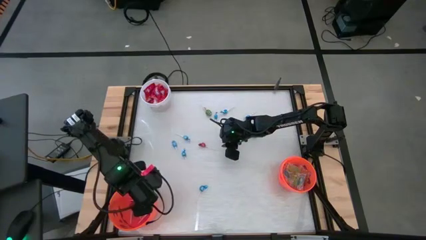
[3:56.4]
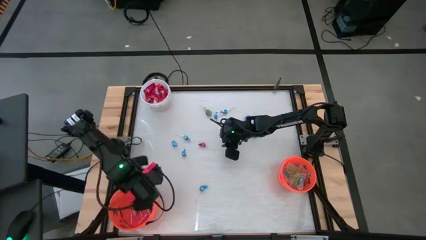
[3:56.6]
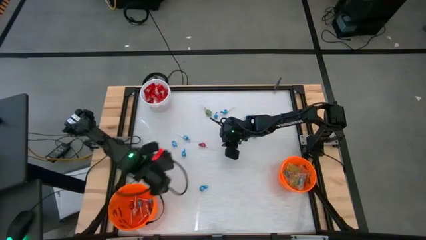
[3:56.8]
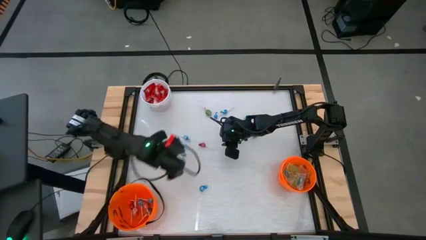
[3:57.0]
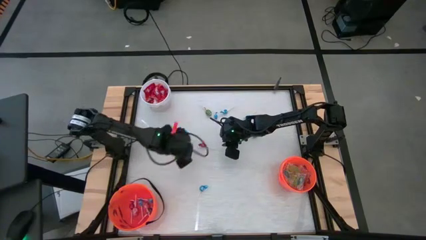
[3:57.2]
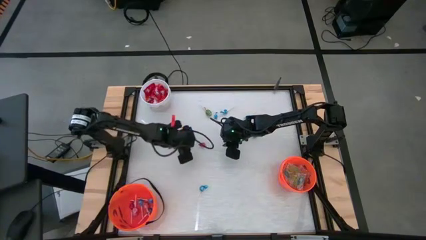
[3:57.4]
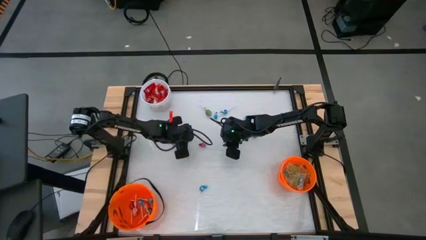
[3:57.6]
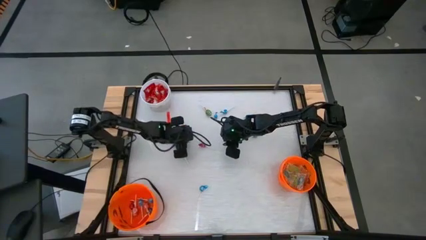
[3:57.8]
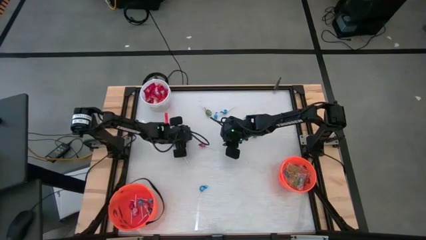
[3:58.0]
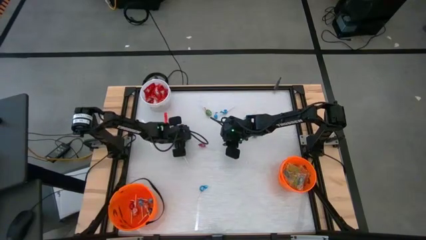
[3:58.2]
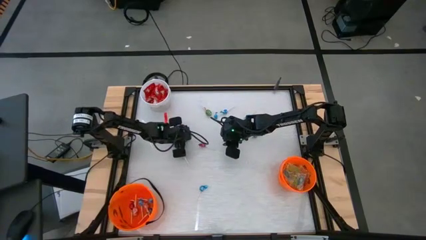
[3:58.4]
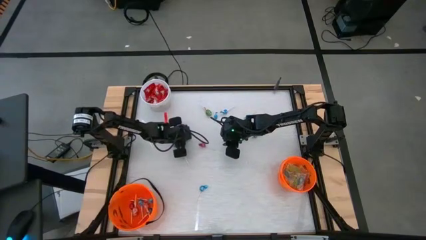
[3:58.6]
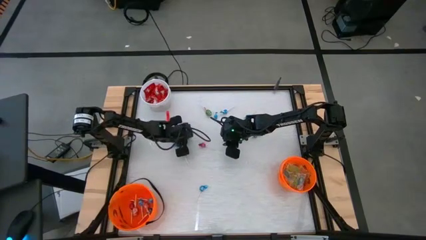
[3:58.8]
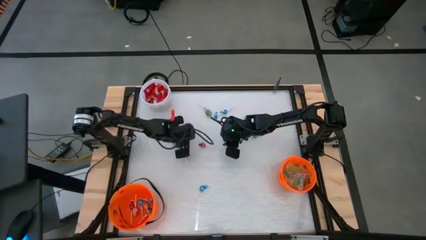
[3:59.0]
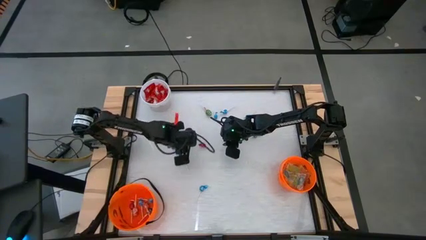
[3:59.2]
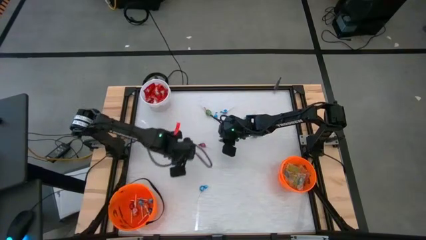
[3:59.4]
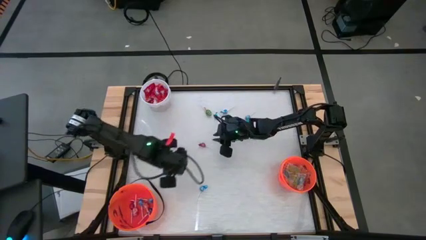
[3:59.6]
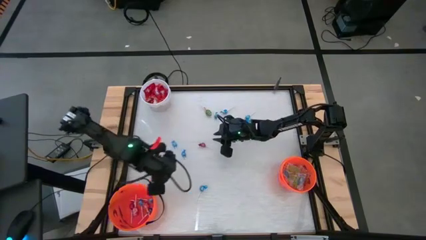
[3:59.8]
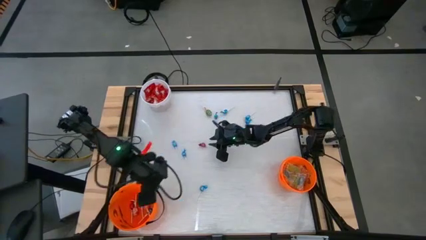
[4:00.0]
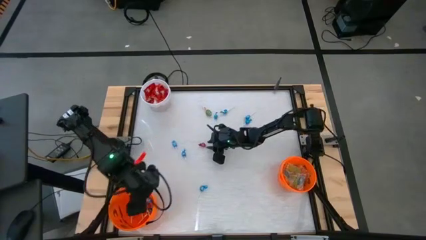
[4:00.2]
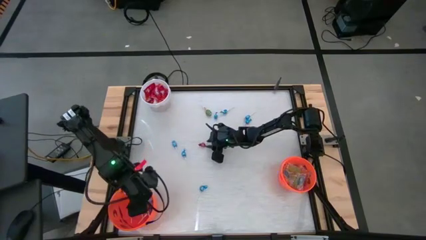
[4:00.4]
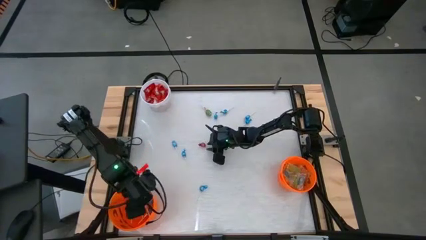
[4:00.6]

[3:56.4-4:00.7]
Task: Sort candy by brand, put in halloween buckets
Put the blue sucker into the left orange bucket

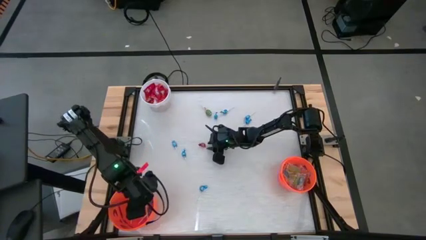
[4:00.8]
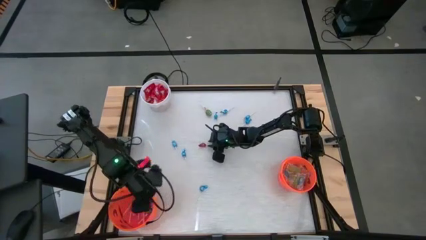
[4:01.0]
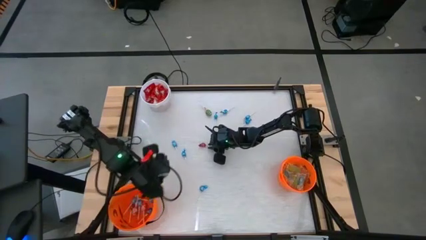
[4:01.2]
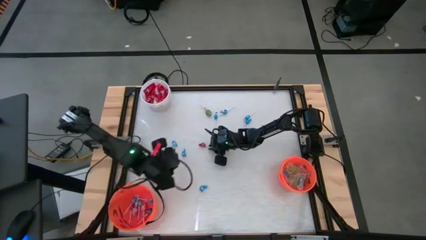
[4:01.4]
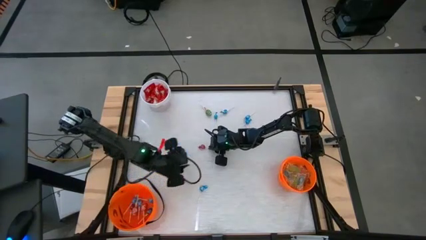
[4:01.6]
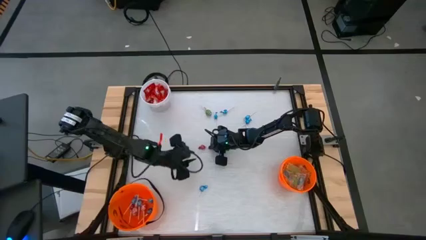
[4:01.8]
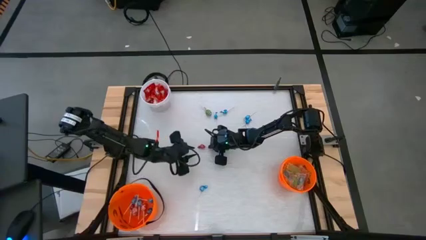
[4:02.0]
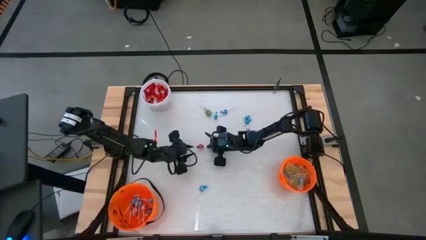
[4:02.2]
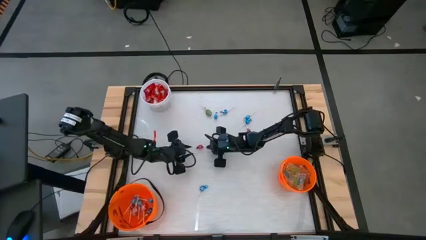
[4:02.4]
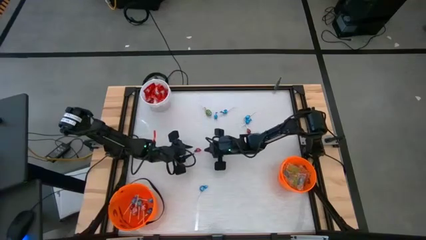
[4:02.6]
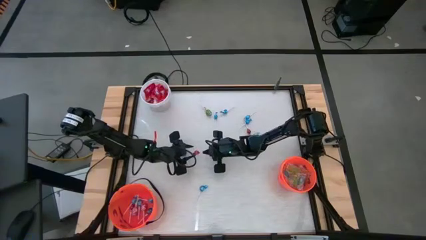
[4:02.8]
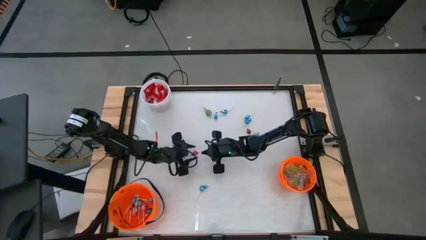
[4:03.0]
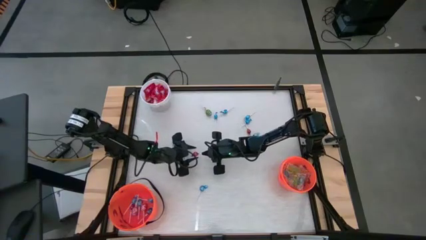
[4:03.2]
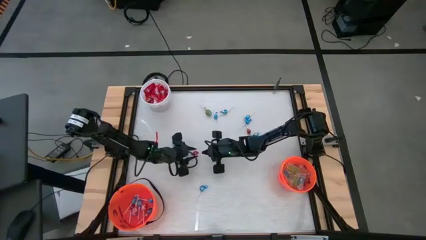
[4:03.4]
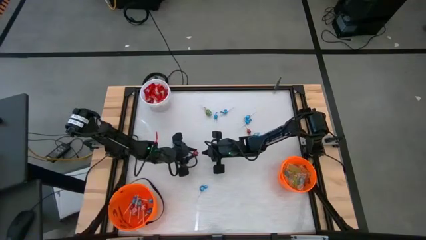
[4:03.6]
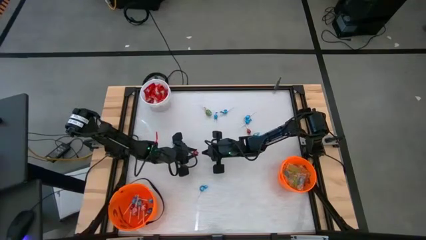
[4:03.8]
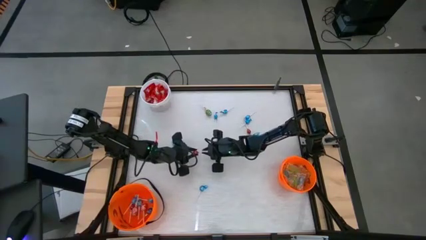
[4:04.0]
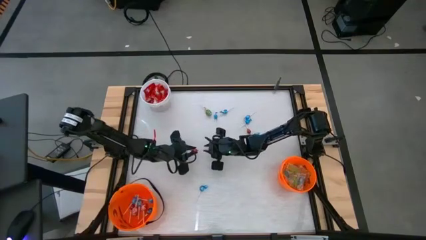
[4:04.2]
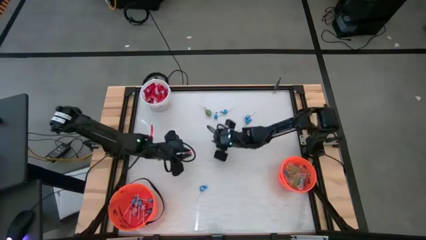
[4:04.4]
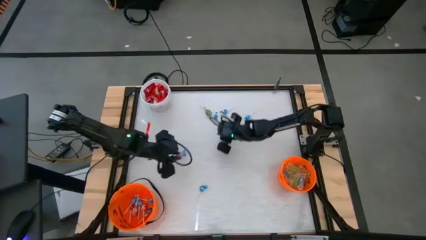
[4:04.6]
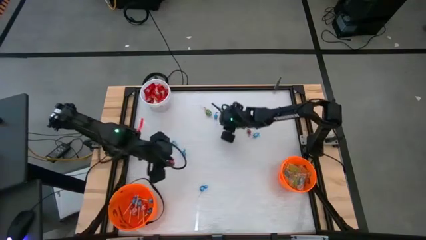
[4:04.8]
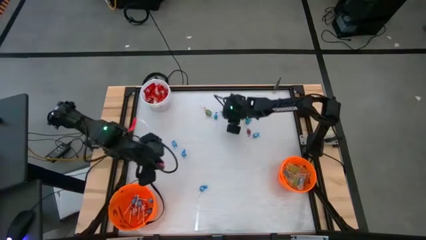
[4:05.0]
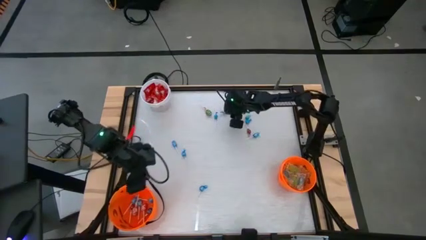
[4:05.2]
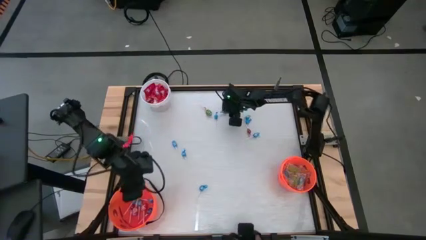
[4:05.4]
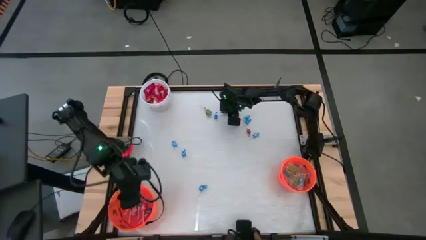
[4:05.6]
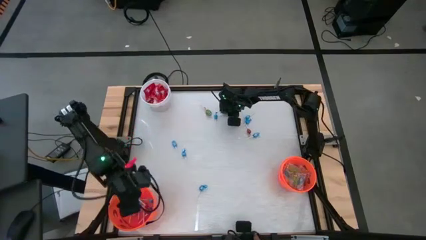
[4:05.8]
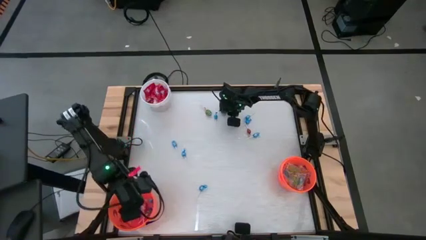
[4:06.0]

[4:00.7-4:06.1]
Put the left small red sucker into the left orange bucket

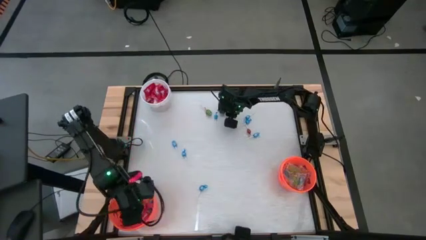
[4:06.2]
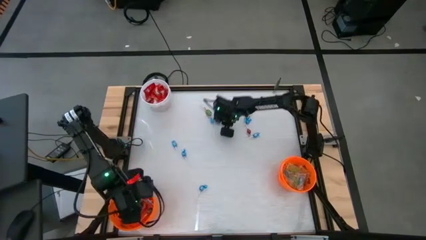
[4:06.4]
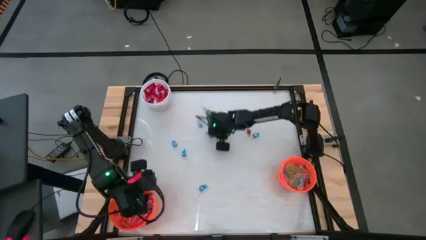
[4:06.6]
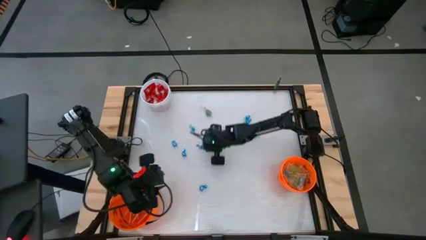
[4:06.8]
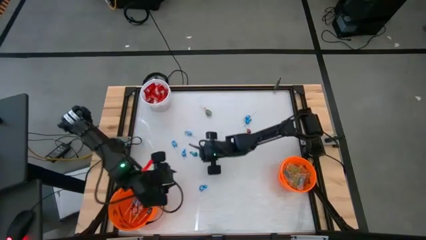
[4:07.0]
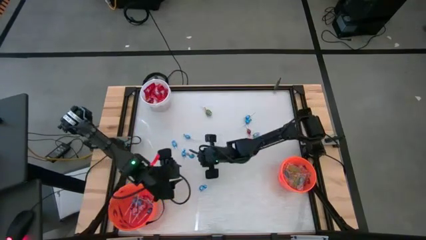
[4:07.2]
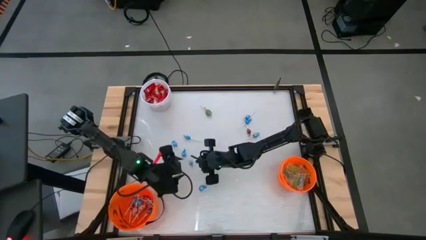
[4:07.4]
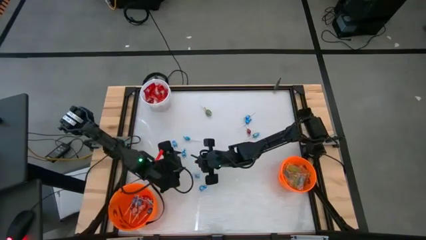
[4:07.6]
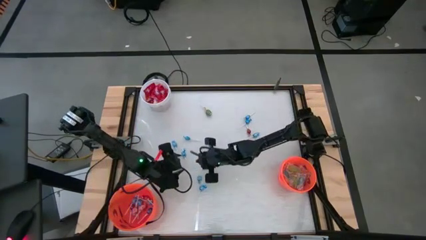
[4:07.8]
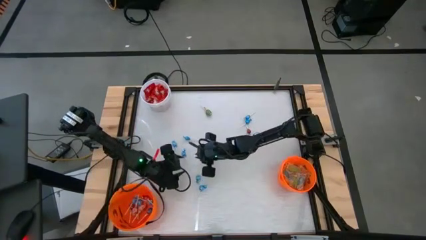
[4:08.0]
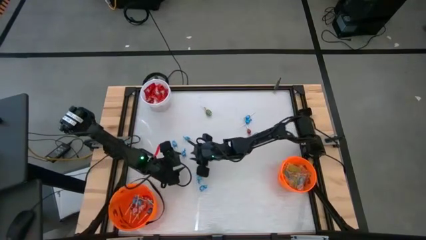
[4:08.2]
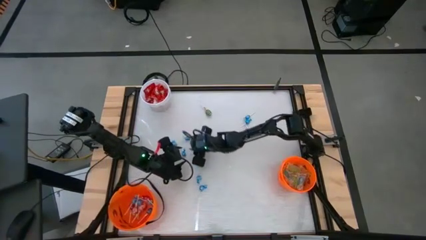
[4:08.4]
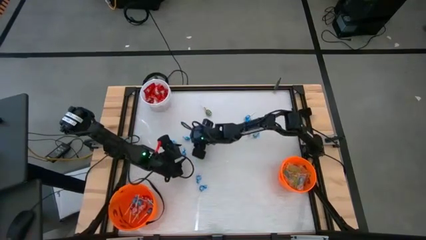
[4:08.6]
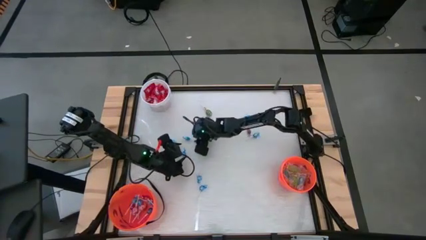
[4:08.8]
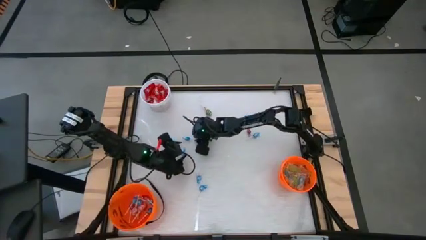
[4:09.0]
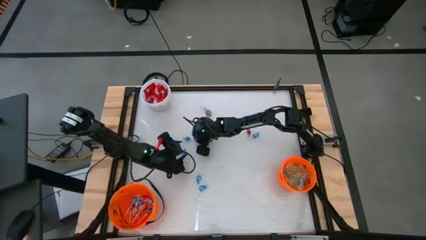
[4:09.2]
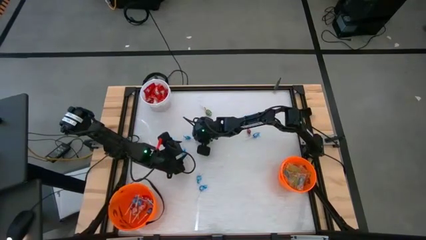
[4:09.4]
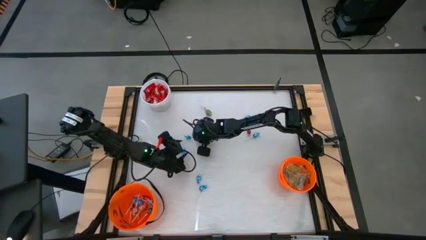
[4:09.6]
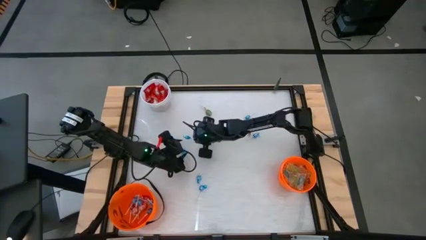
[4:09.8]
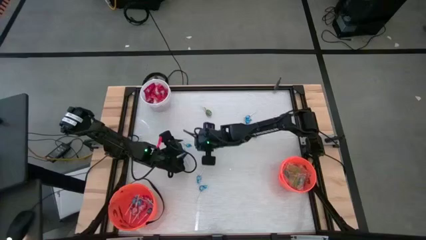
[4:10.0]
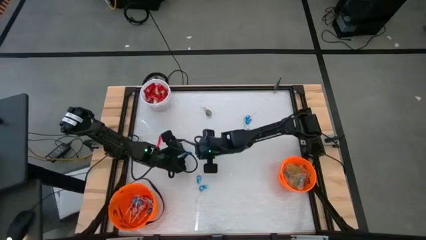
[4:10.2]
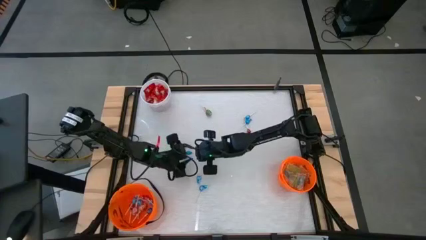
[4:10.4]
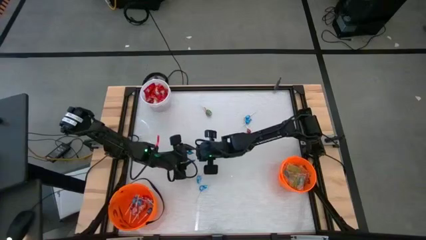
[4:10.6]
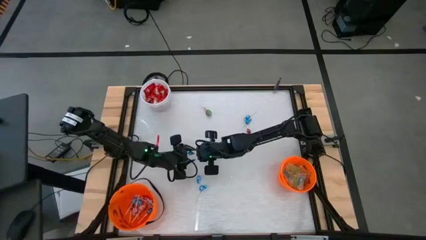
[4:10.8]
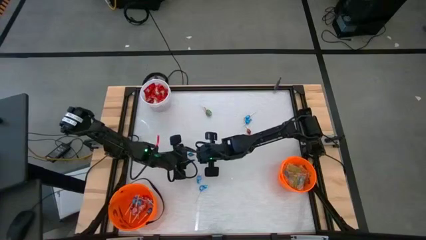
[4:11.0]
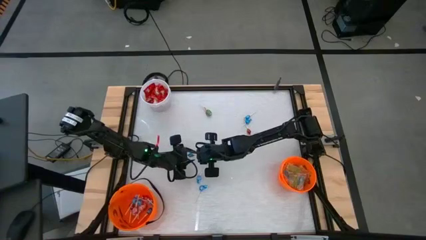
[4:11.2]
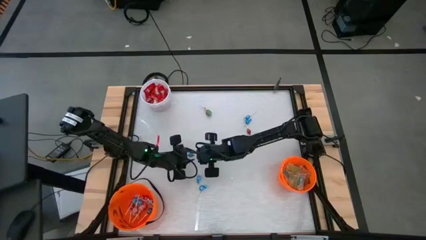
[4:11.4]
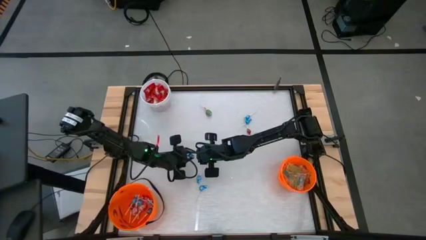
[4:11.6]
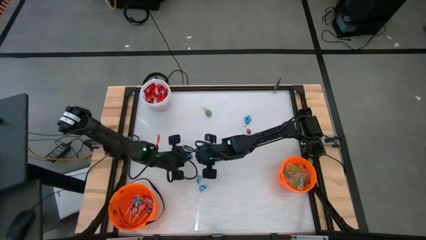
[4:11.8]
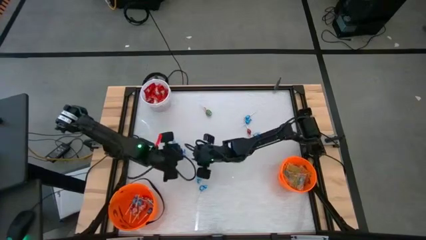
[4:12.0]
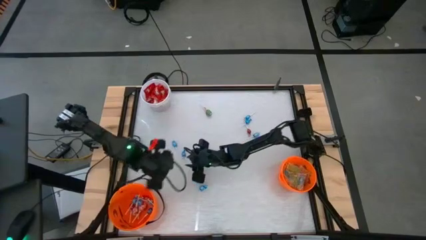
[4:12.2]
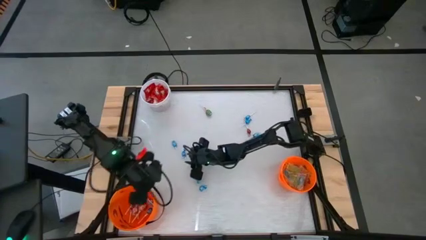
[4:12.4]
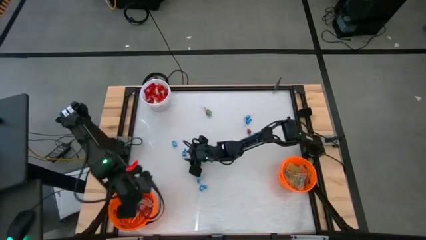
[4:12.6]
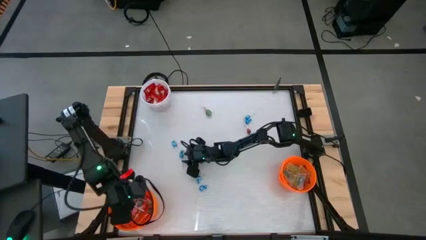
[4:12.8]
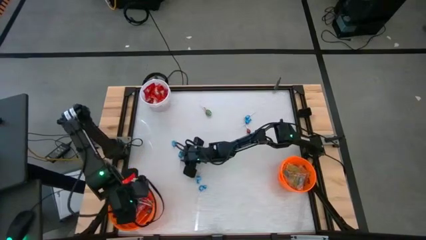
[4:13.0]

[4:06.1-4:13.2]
Put the blue sucker into the left orange bucket

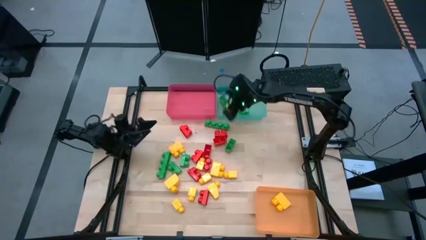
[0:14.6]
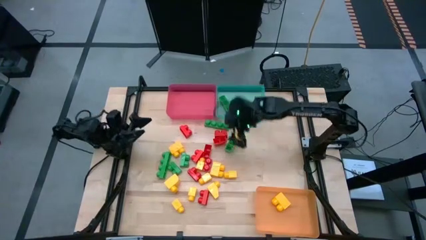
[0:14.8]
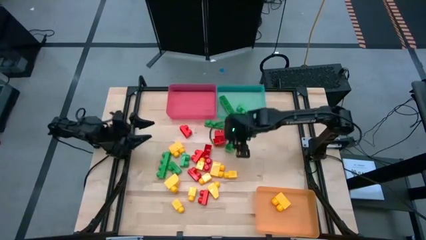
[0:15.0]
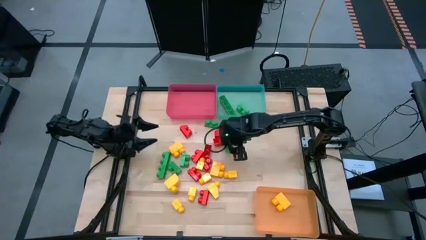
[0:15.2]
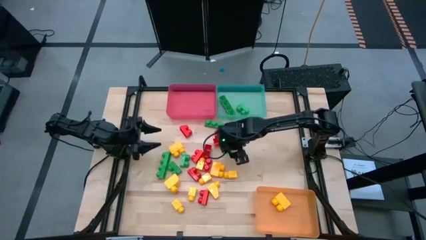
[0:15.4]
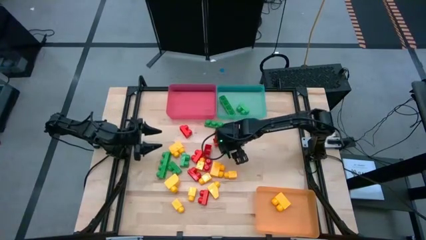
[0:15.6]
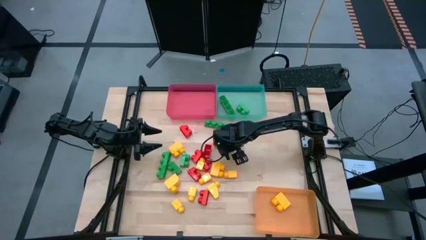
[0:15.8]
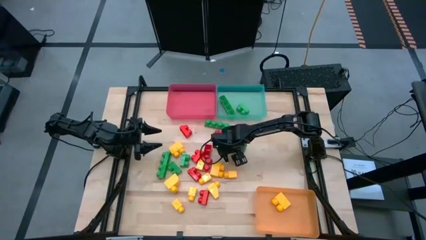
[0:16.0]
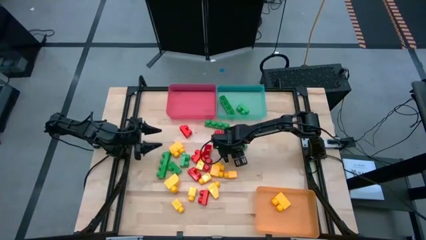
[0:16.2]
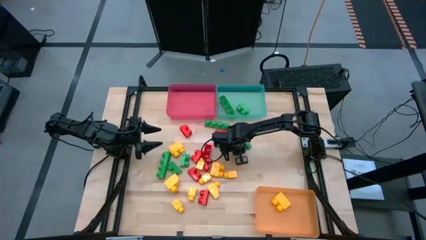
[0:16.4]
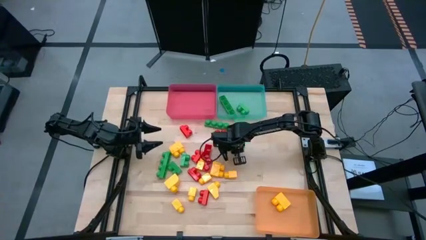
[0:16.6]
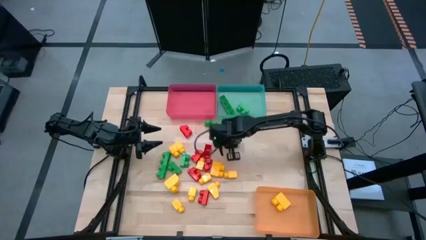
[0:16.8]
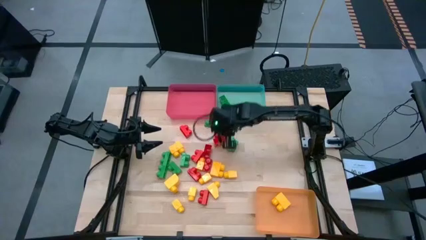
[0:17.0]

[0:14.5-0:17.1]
Task: Sort blocks
Put the green game piece into the green bin
